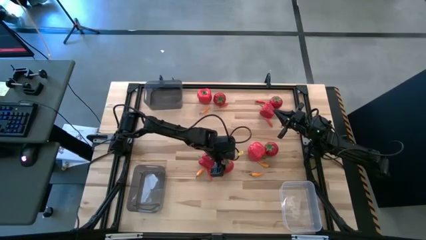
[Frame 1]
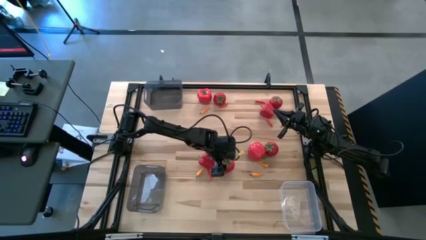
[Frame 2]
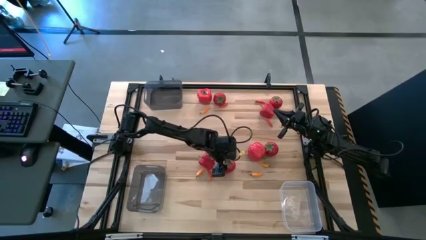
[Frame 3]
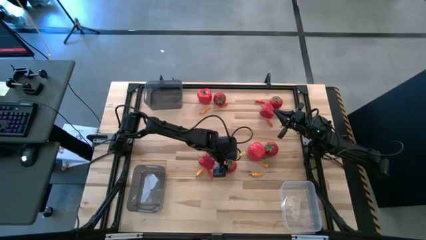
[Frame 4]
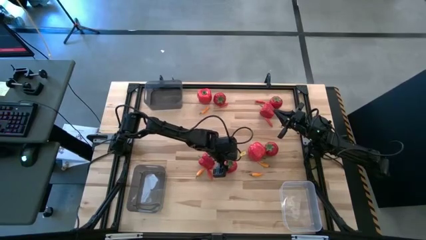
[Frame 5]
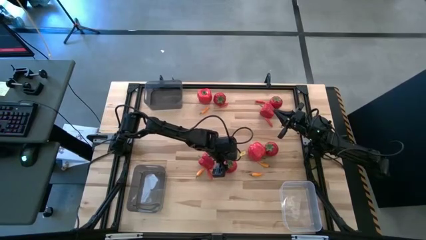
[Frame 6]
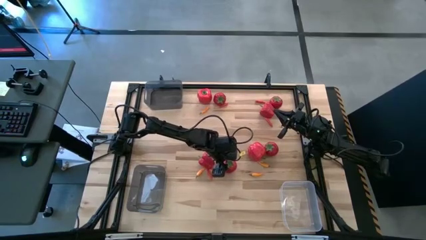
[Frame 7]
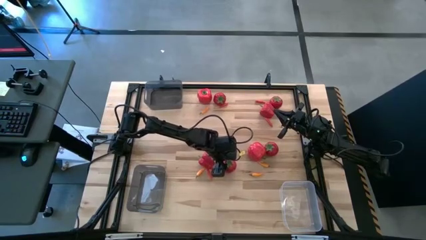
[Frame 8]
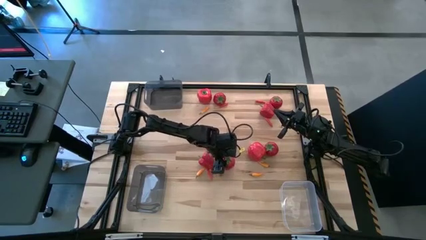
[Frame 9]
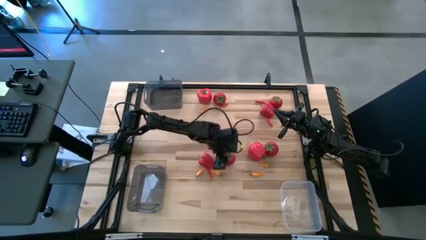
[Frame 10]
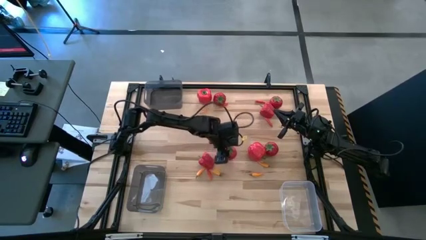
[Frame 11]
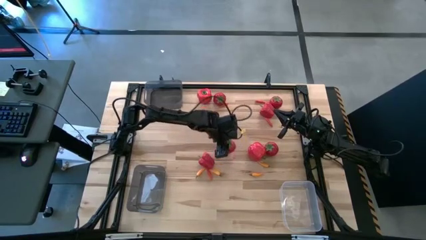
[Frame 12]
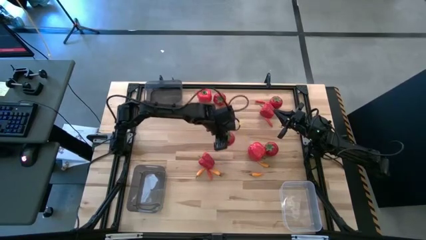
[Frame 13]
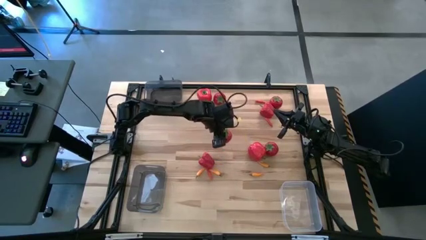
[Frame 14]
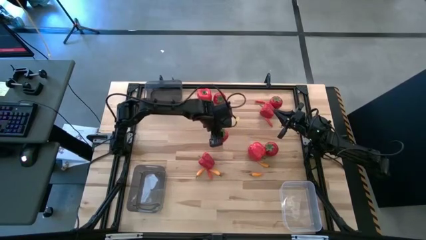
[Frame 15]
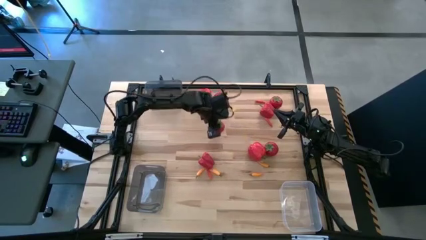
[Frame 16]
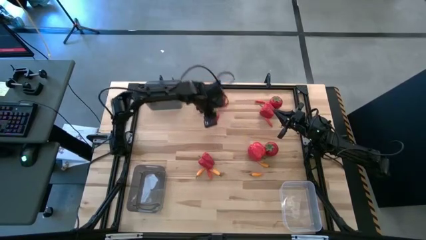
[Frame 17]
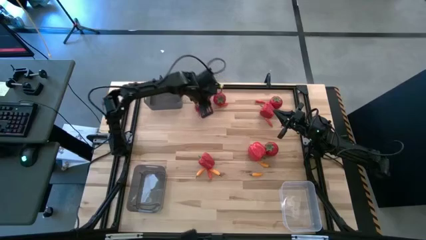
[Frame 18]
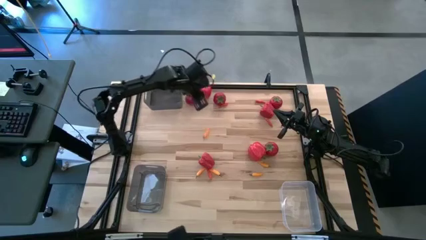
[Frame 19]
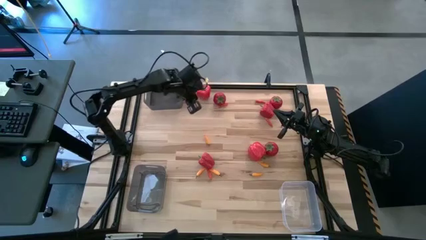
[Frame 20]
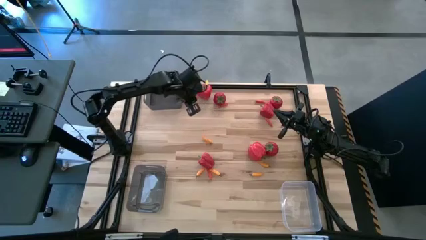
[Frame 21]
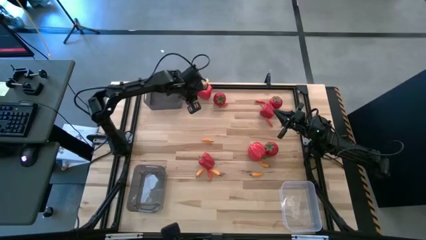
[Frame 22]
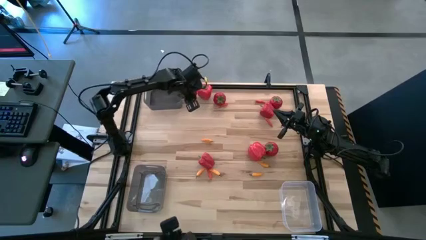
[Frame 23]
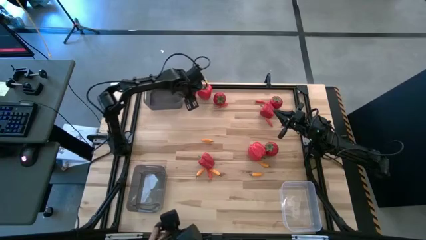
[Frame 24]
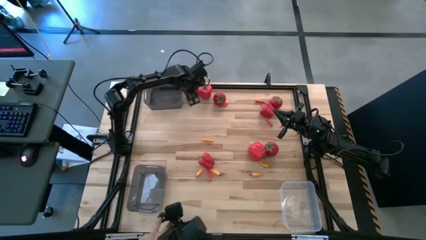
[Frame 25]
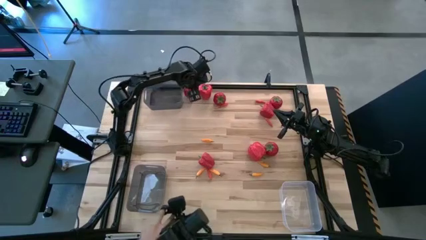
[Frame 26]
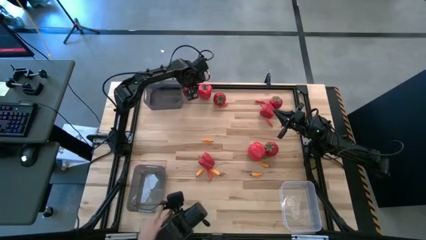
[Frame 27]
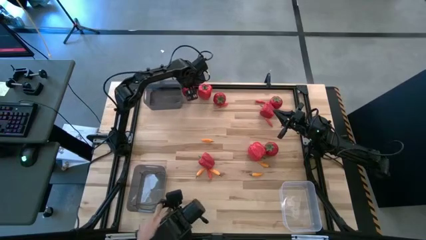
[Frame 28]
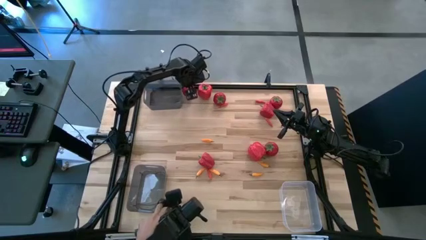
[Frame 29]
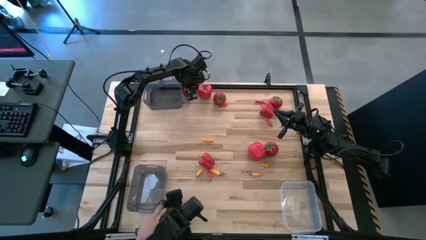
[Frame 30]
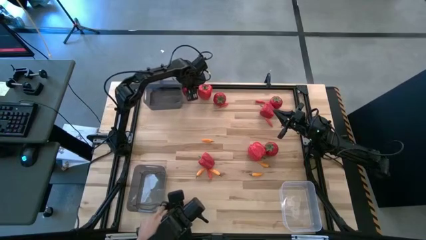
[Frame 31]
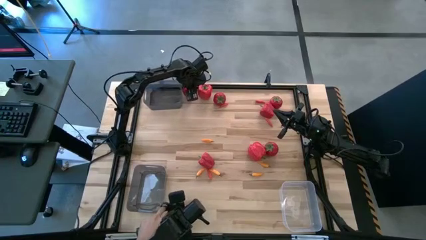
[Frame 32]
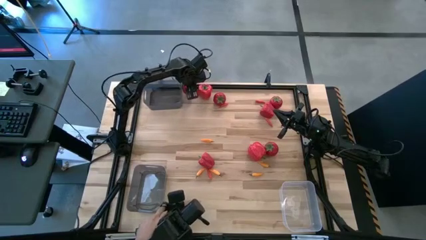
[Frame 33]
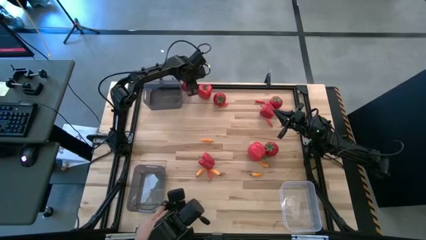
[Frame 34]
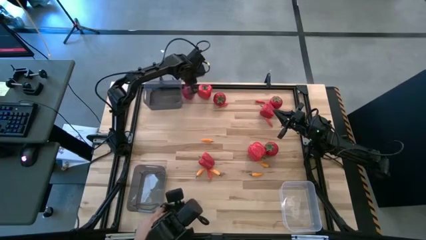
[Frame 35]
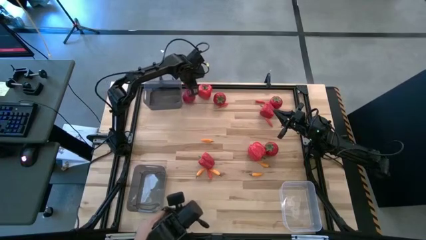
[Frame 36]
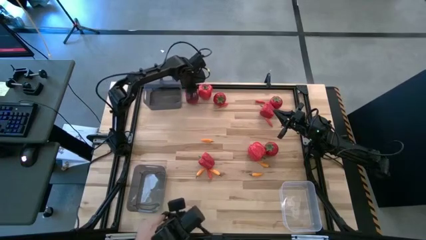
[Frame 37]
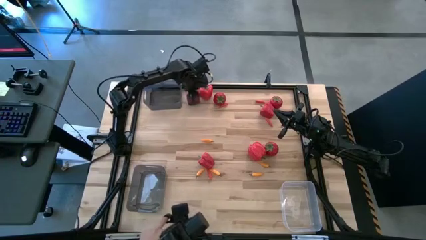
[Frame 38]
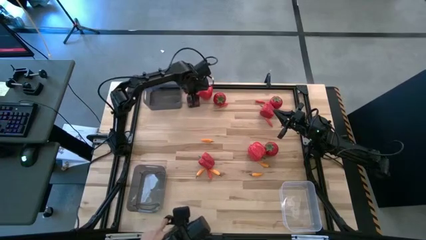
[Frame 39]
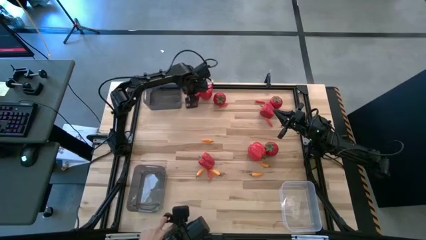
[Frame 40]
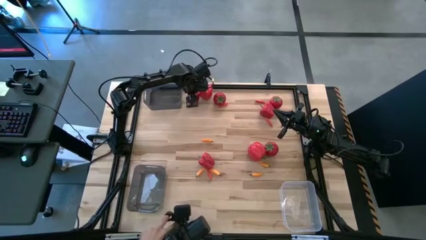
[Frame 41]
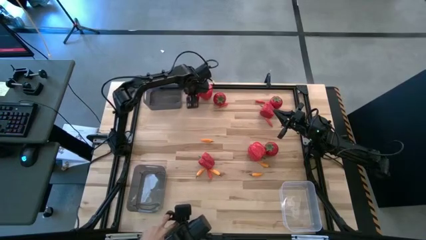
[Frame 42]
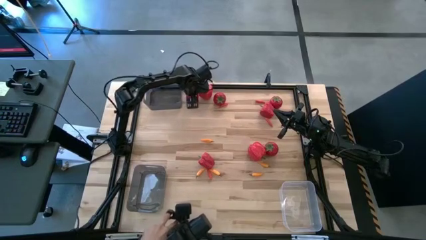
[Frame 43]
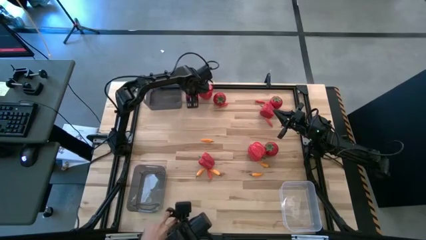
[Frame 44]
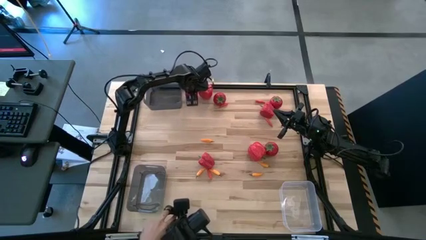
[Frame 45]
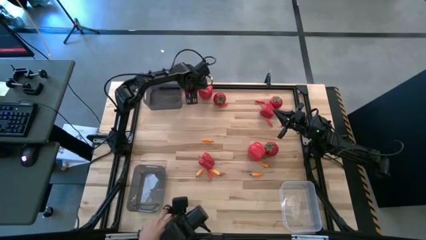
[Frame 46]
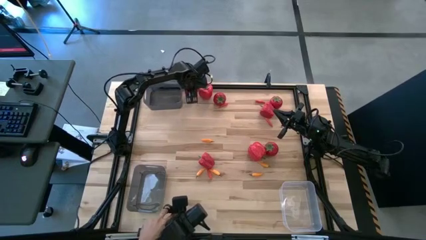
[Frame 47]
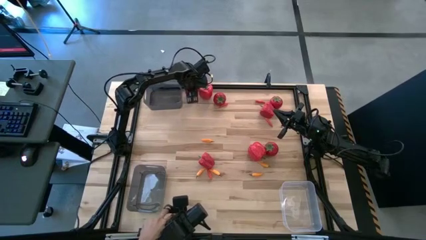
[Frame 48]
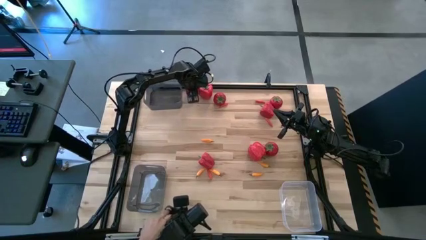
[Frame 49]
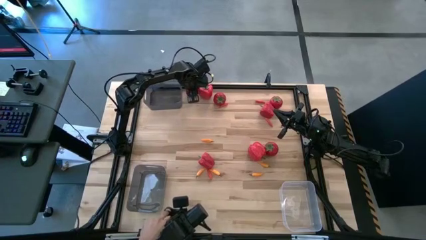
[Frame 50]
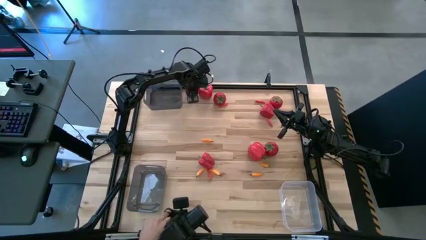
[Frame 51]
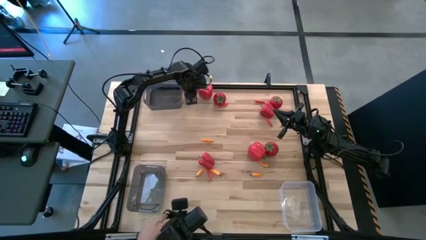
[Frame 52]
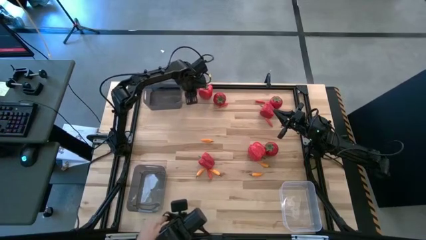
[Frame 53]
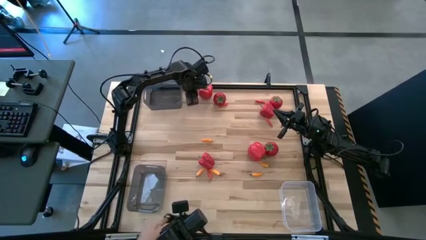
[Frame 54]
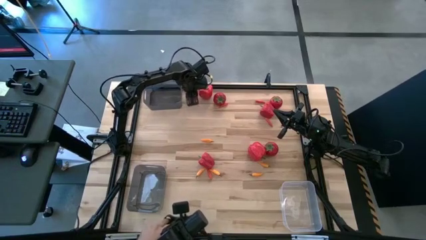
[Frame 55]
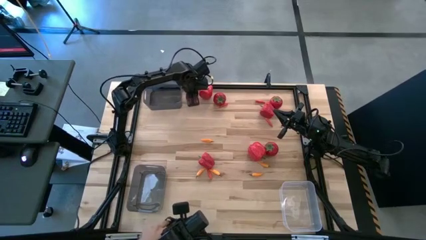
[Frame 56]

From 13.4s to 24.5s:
Task: Sort produce into baskets
Put the red tomato into the top black bin

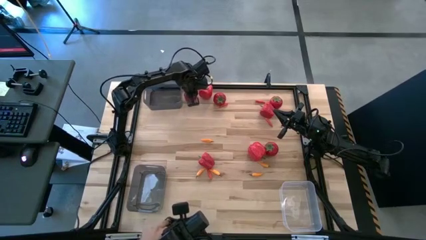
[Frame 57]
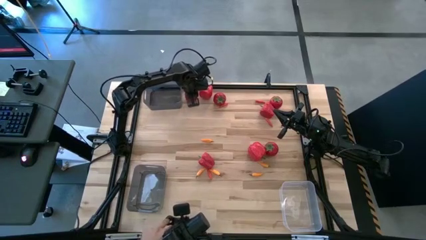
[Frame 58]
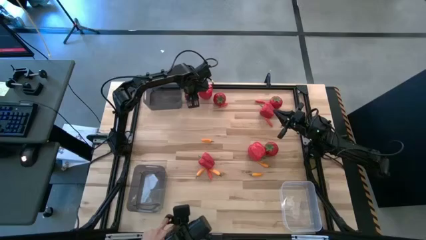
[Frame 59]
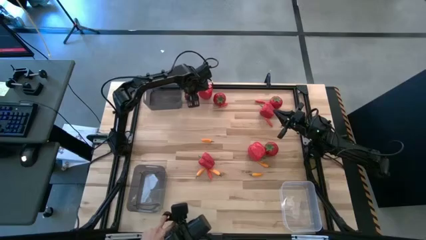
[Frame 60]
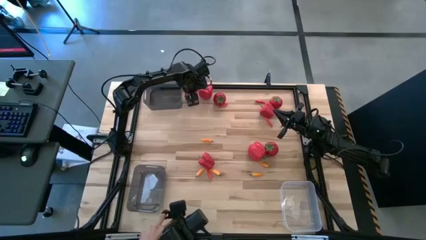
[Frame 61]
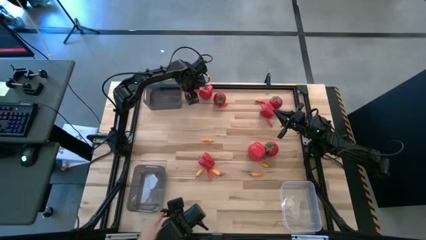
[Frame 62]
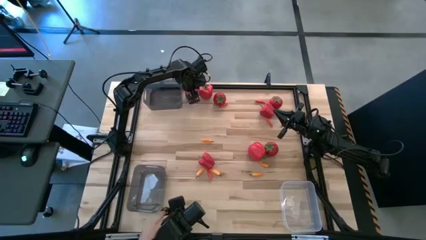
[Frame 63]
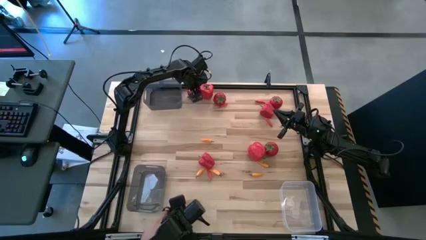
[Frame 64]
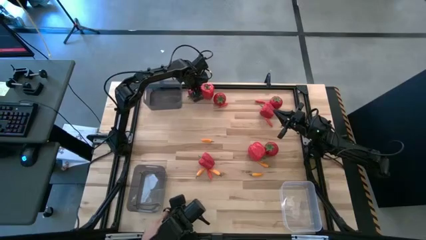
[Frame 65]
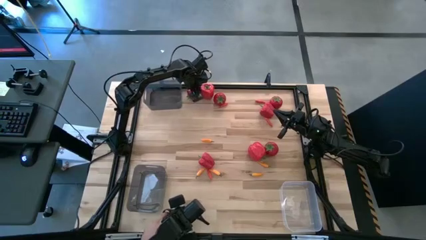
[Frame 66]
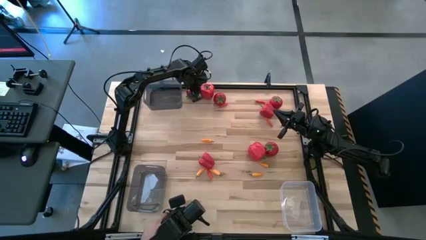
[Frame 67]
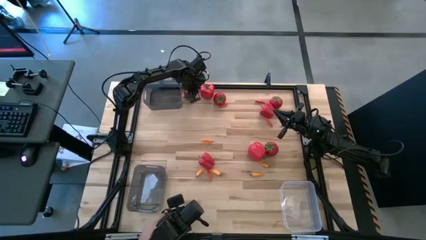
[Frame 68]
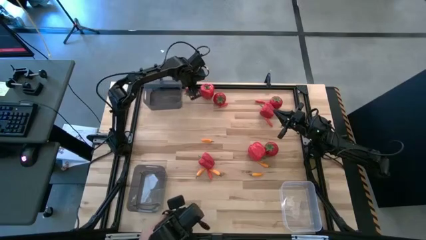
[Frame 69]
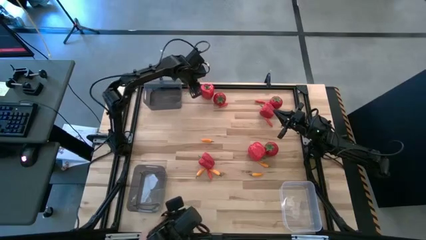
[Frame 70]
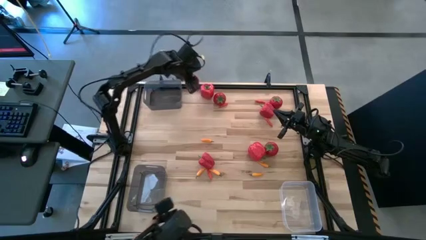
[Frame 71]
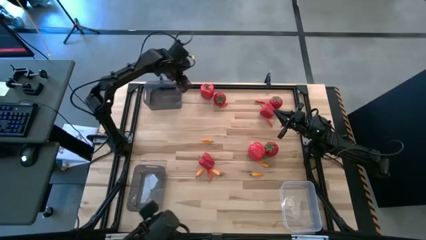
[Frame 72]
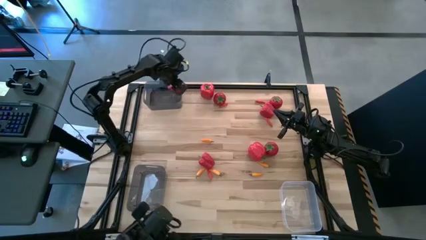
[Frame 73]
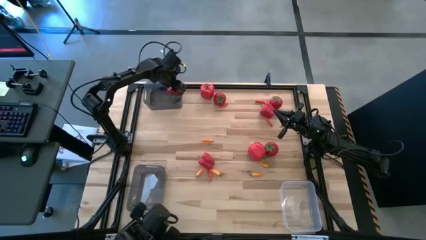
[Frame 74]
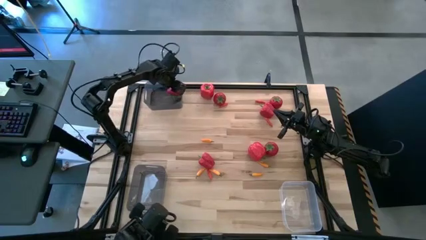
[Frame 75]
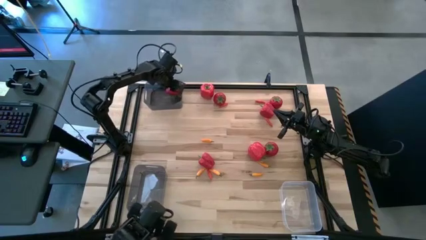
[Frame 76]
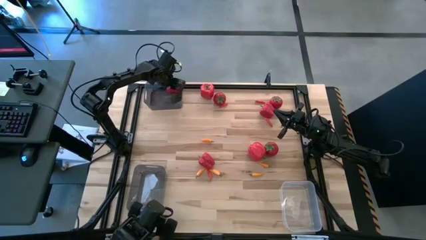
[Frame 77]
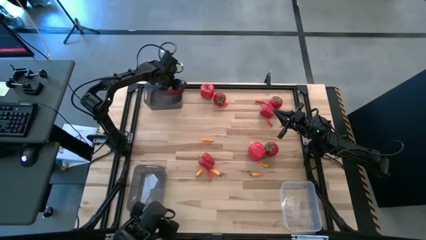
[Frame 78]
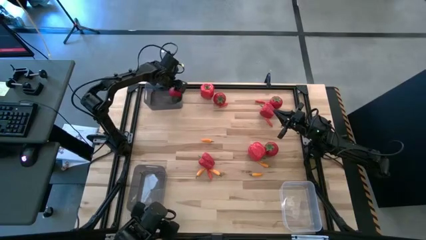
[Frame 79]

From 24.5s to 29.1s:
Put the red tomato into the top black bin
